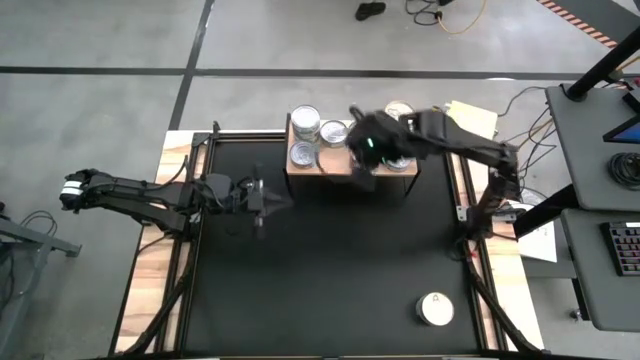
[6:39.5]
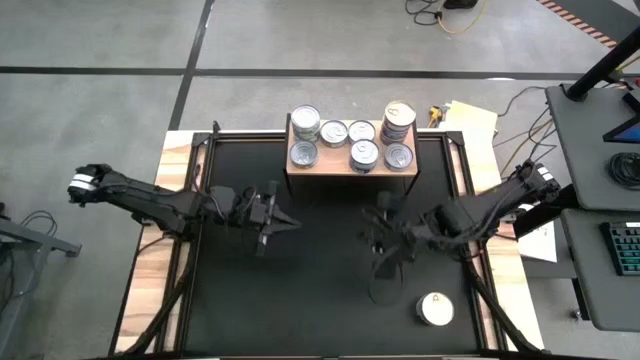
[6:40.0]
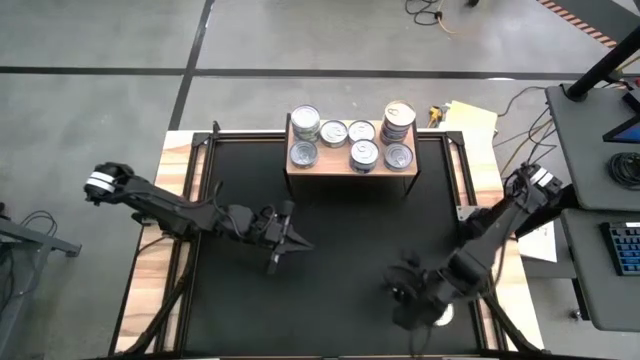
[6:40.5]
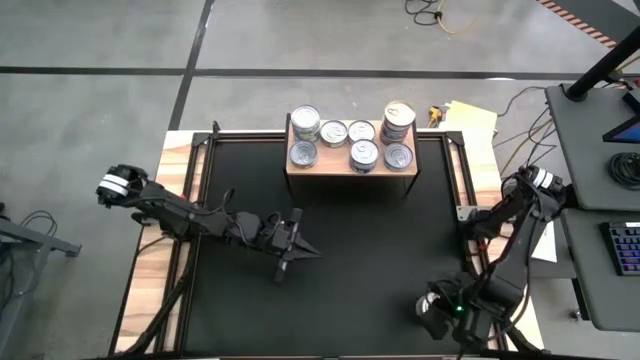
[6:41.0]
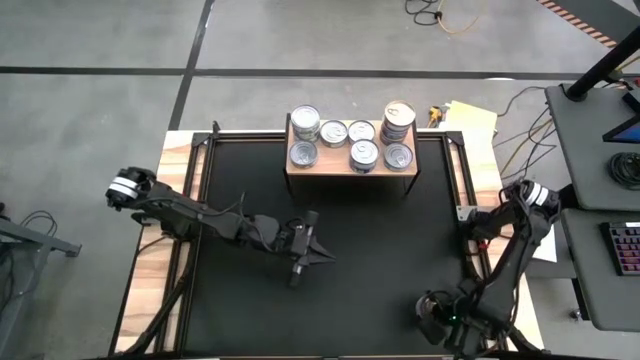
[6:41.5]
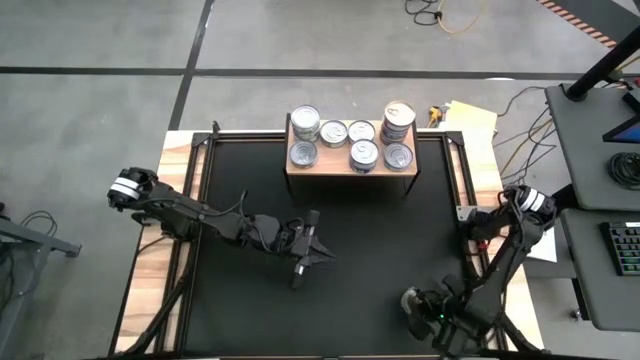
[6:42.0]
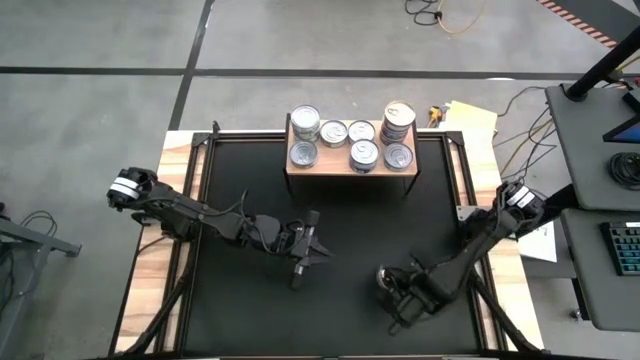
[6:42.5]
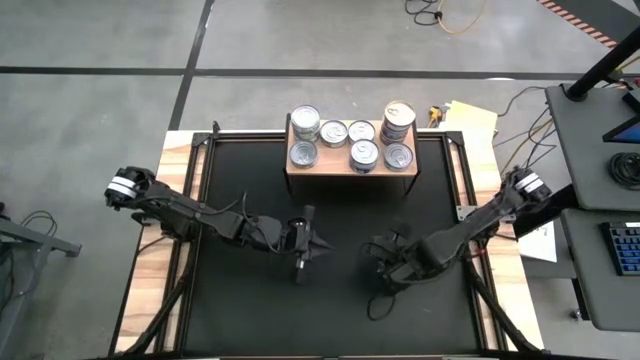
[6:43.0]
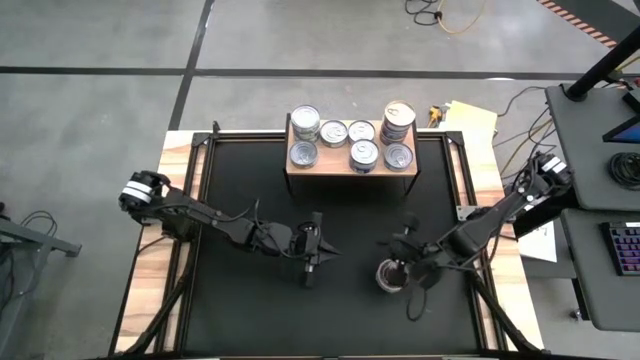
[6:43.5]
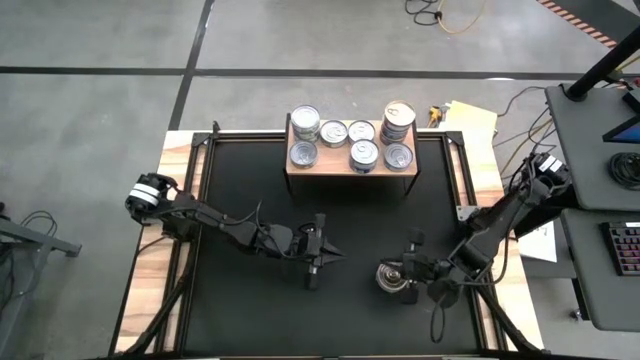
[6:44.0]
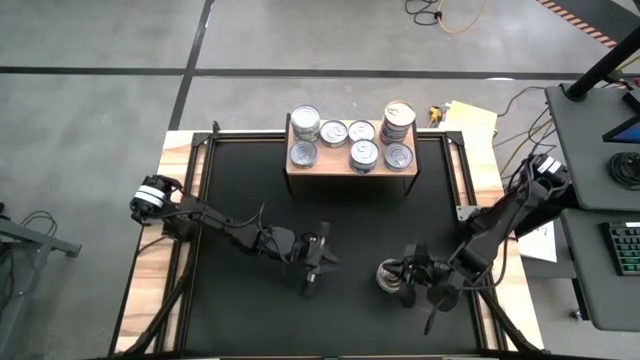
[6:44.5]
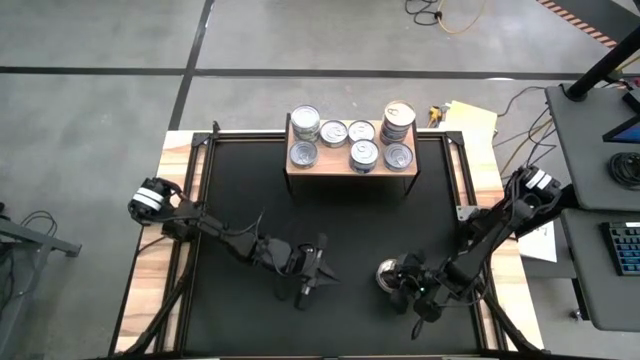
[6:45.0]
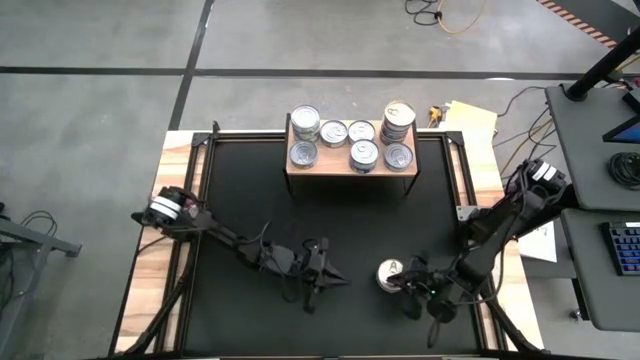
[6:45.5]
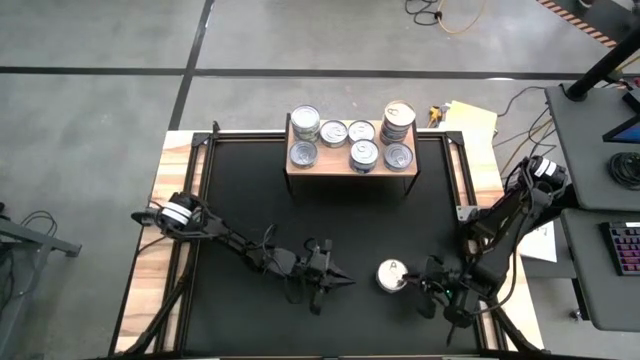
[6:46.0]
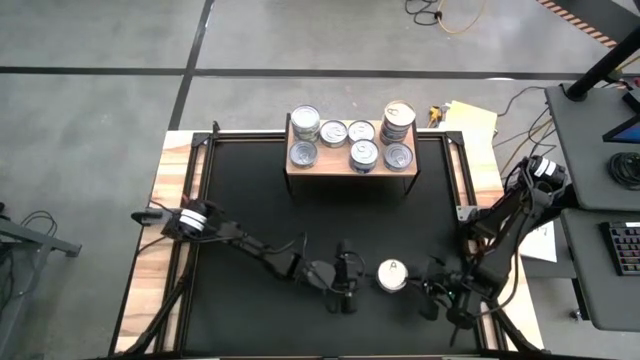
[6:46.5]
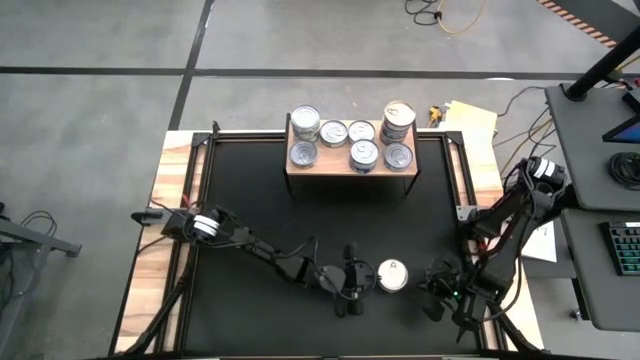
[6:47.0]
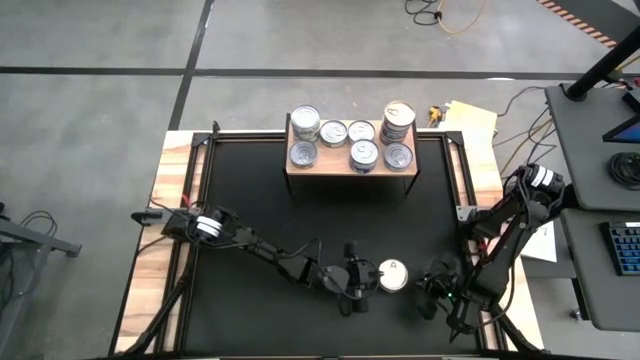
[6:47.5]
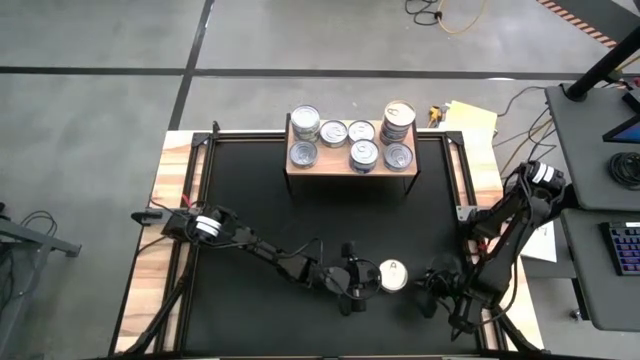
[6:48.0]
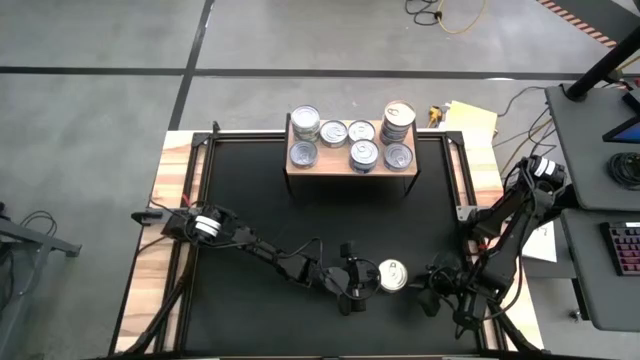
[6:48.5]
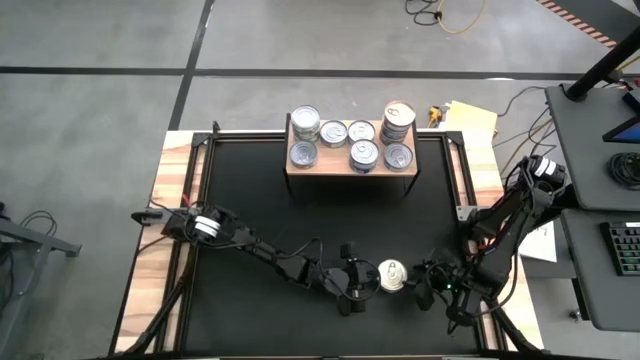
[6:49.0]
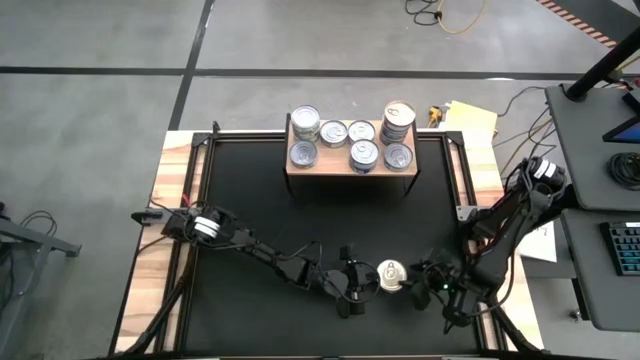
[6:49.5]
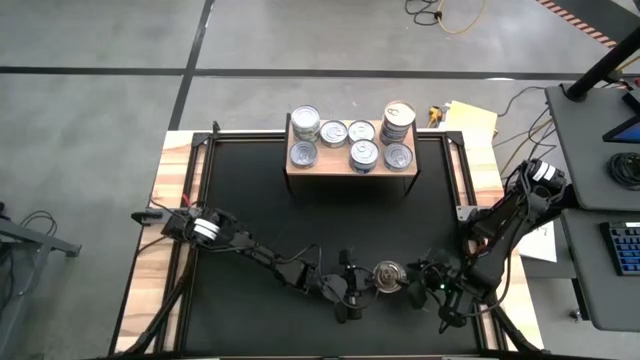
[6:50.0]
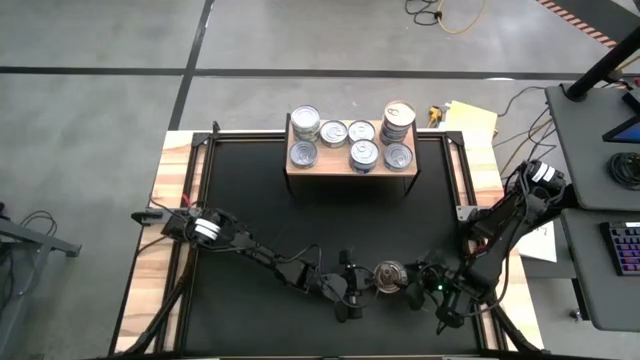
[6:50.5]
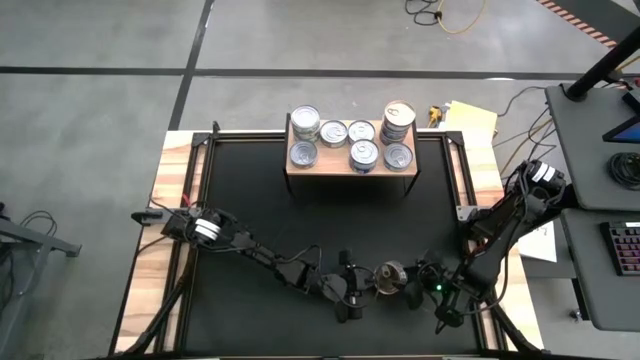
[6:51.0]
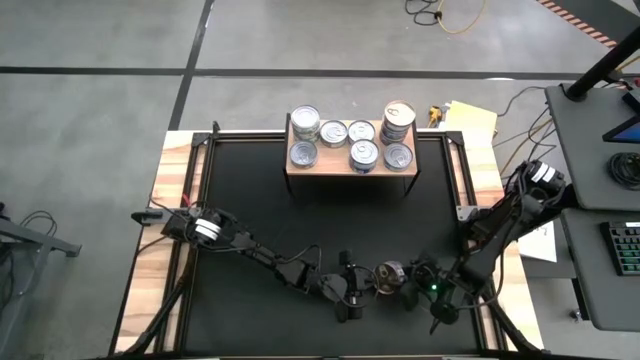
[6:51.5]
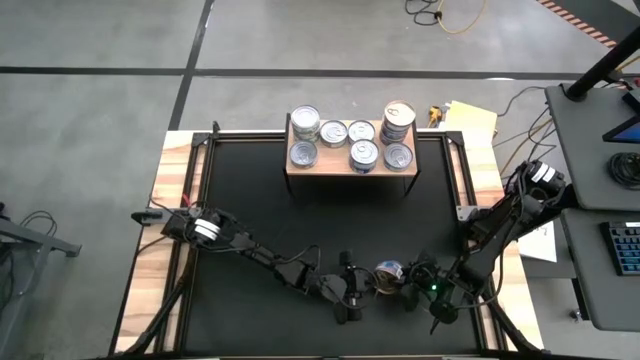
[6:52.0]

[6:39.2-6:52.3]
Task: Stack canned seafood by type on shelf
Stack the blue pink tuna can on top of the blue pink tuna can on the shelf

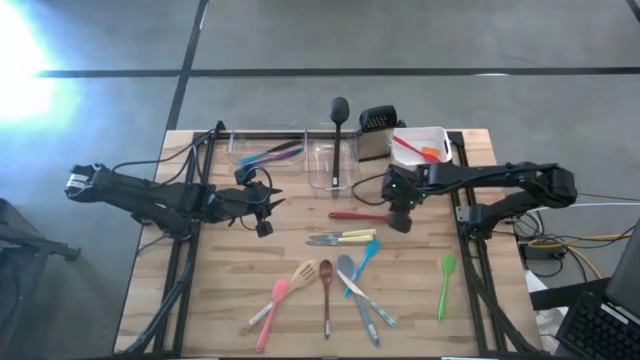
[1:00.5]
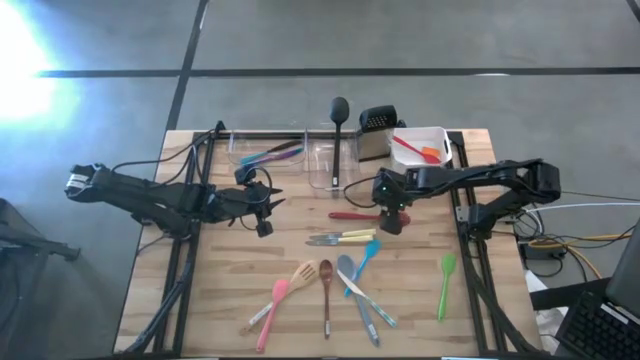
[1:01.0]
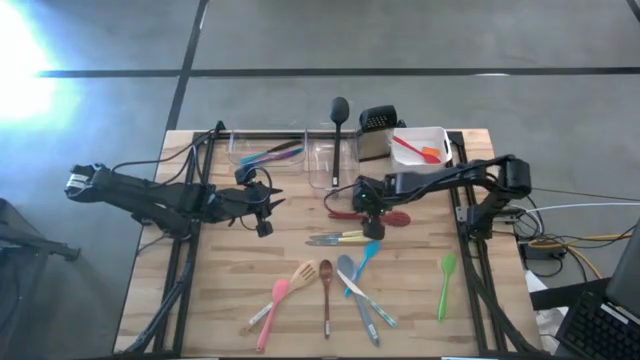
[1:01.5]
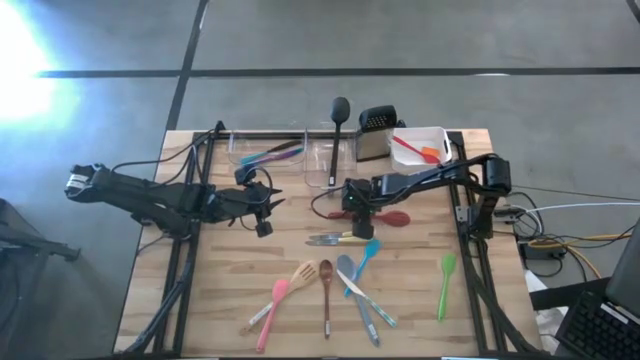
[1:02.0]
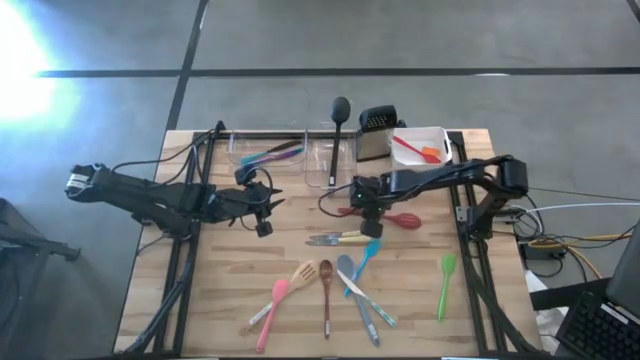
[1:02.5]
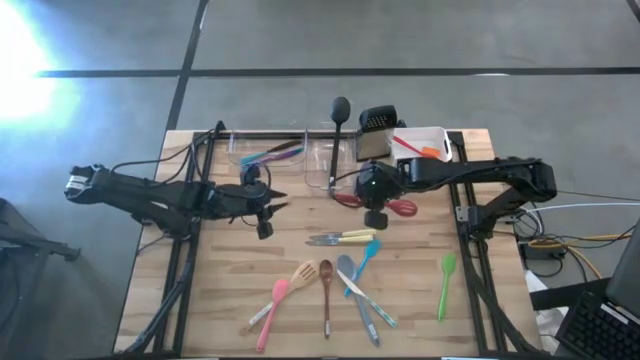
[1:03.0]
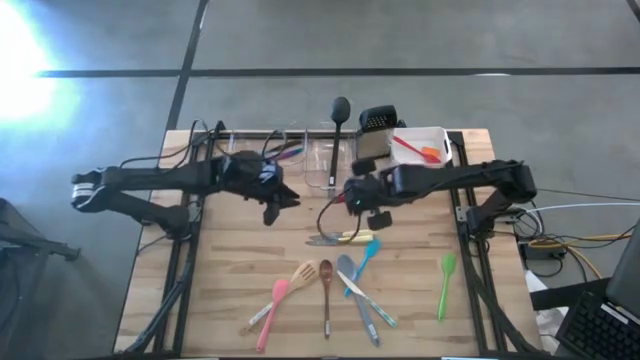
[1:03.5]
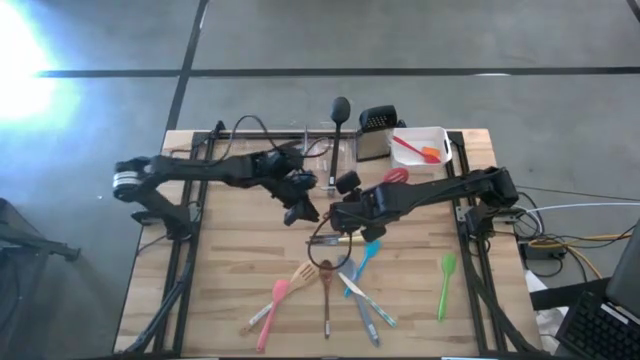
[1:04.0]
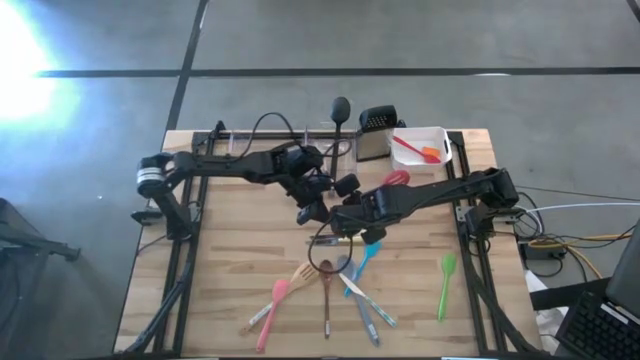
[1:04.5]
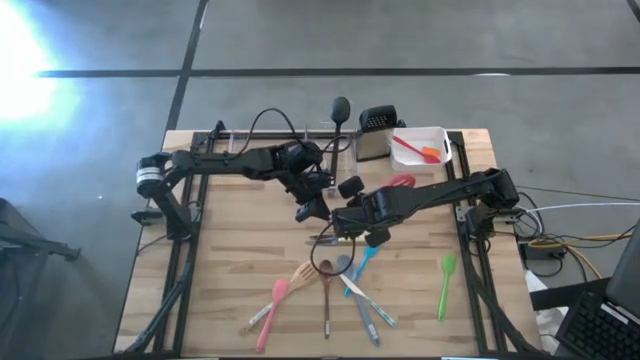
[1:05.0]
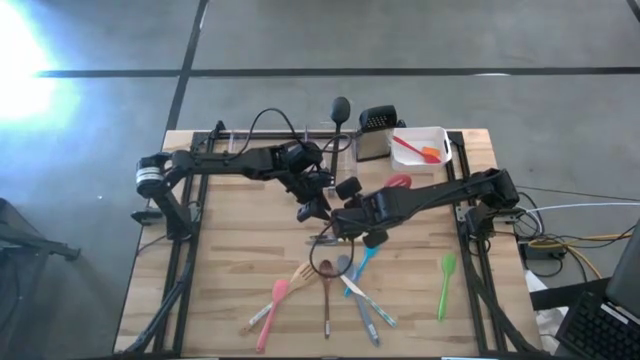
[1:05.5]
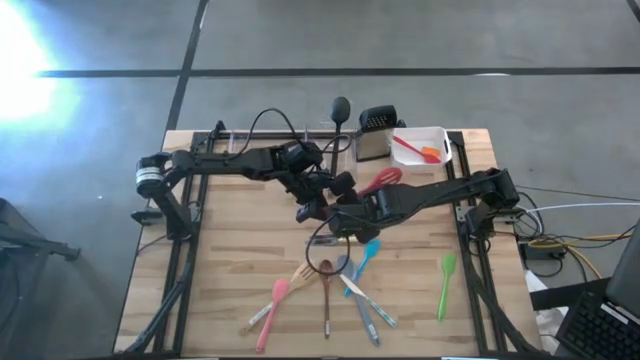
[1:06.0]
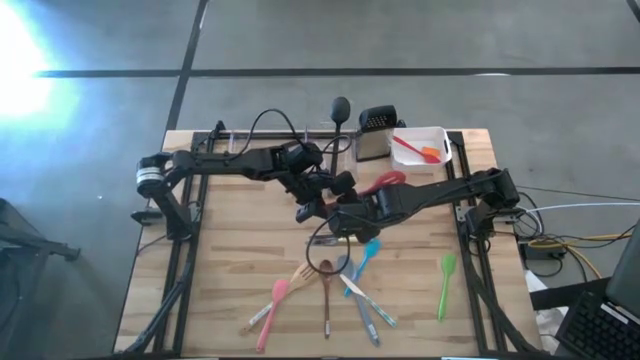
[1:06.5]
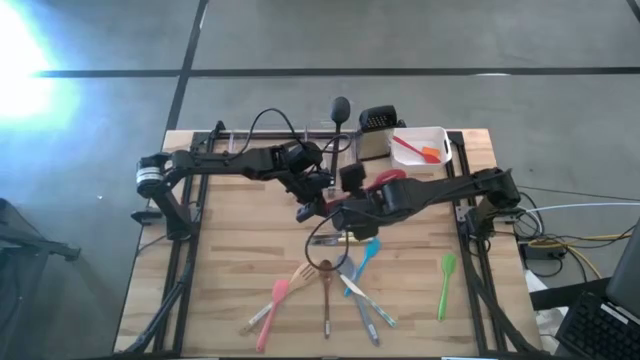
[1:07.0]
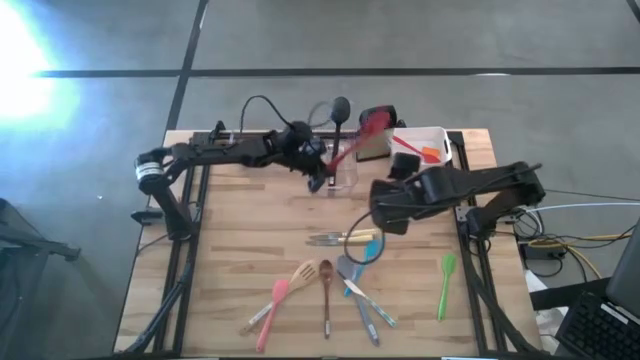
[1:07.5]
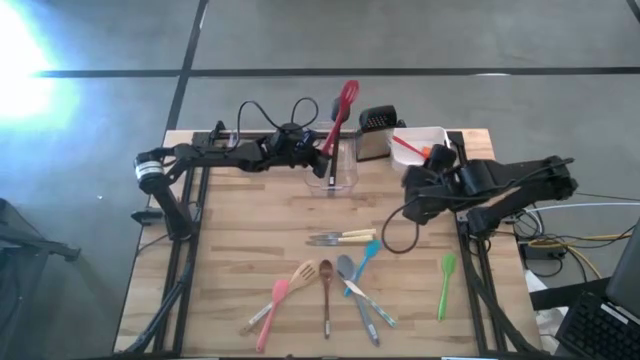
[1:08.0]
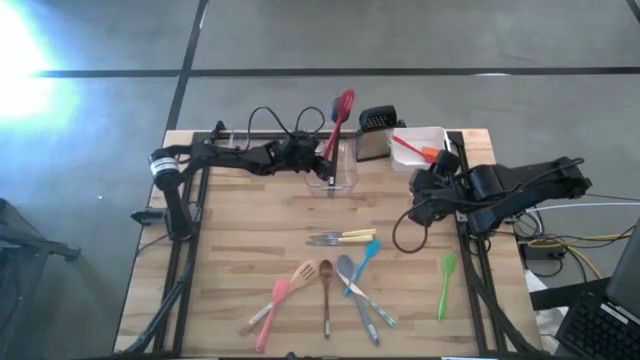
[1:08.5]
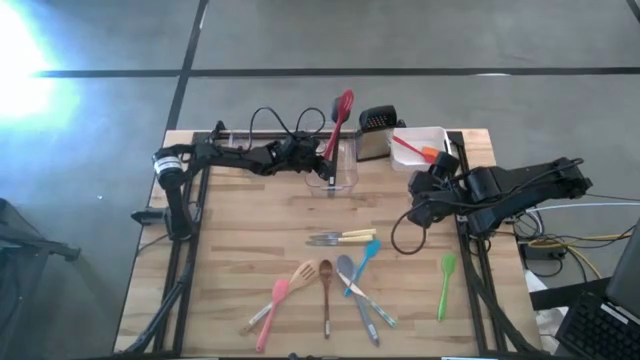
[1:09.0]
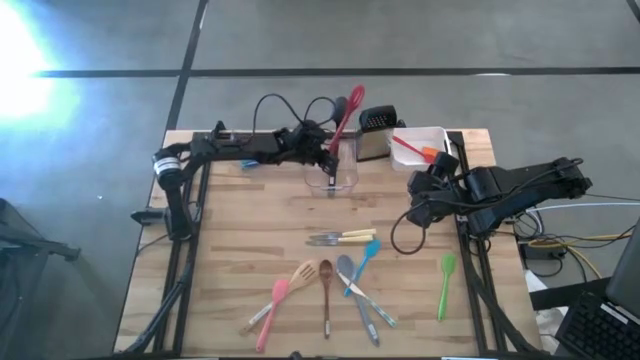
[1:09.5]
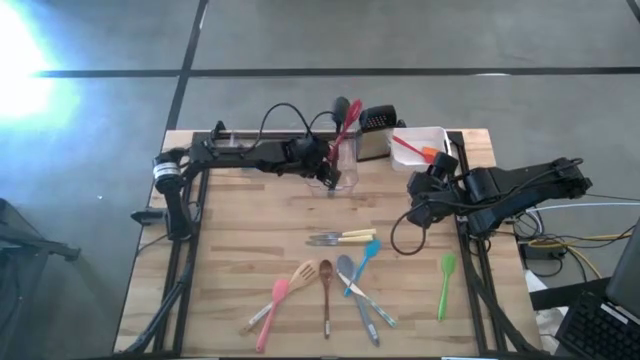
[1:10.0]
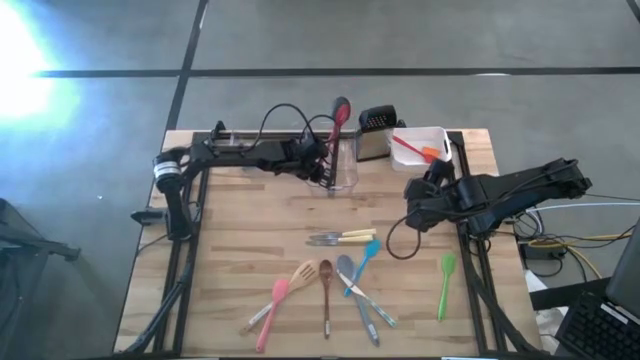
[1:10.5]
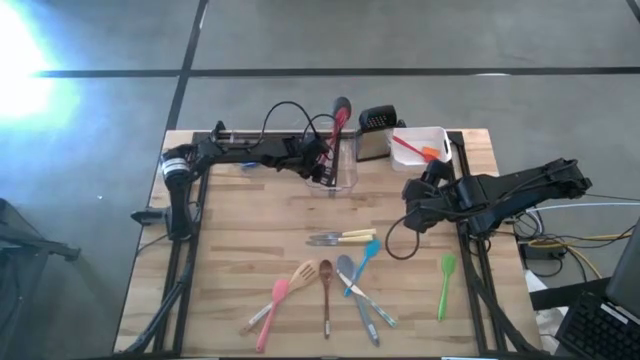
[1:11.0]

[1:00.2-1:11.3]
Task: Pick & Place Kitchen Items
Put the red serving spoon into the right transparent bin
